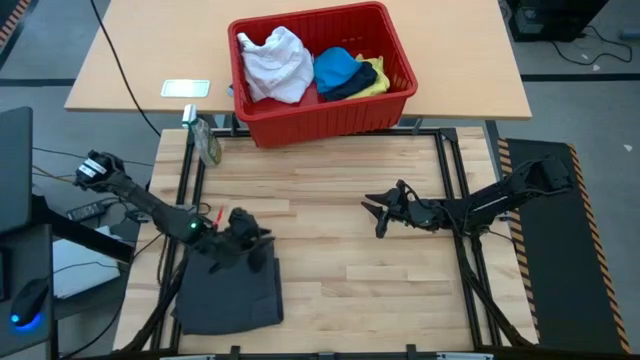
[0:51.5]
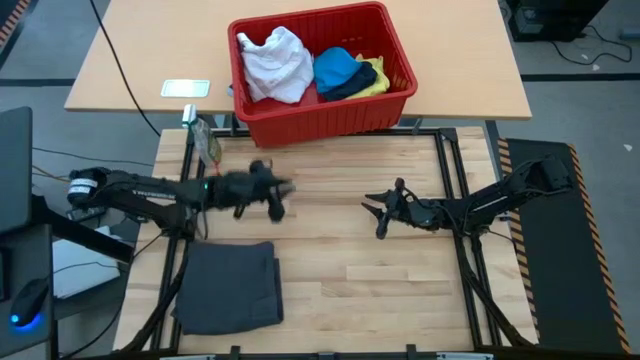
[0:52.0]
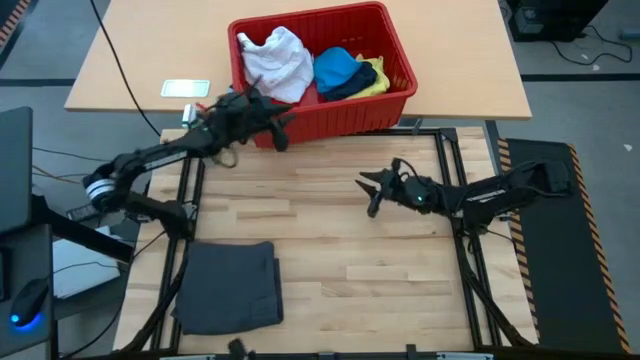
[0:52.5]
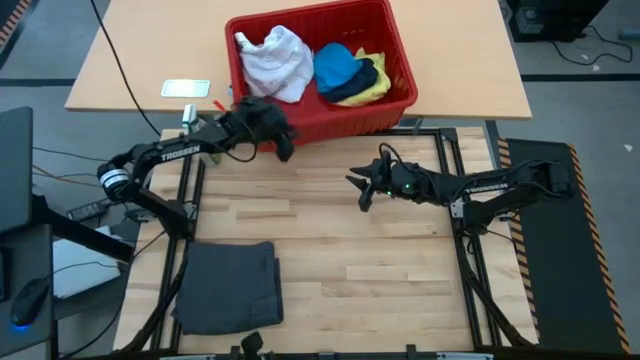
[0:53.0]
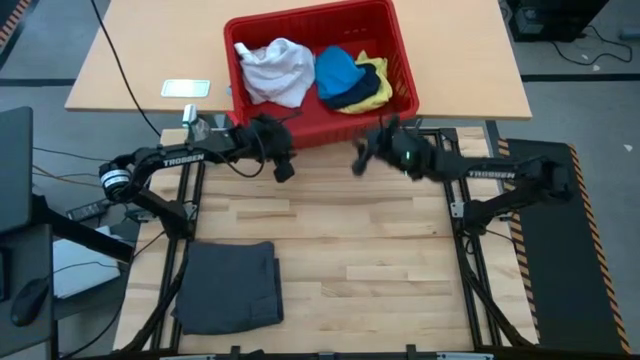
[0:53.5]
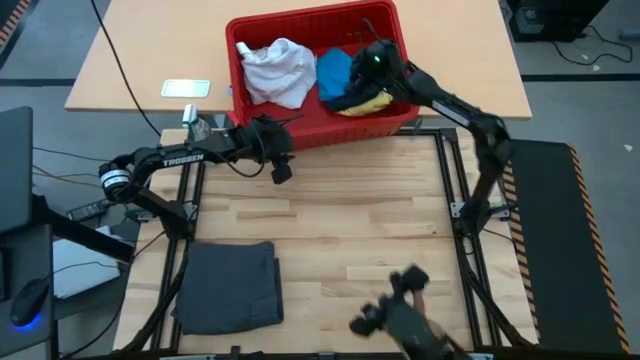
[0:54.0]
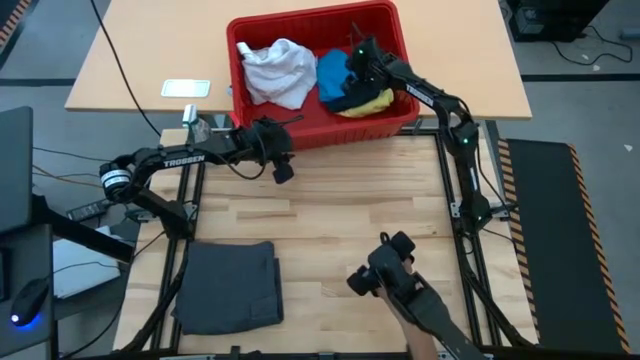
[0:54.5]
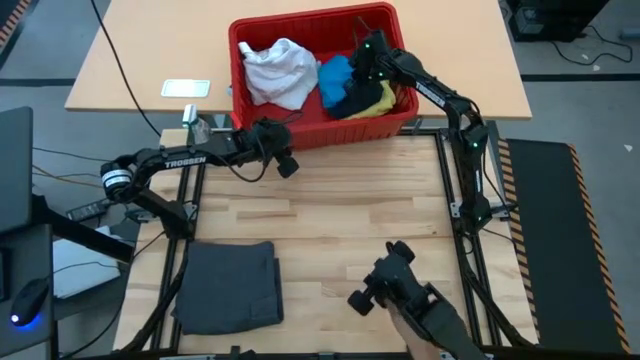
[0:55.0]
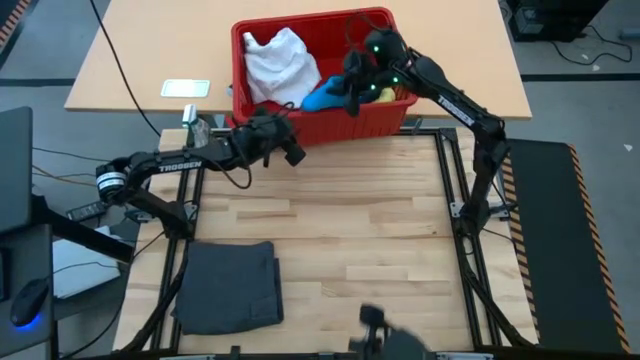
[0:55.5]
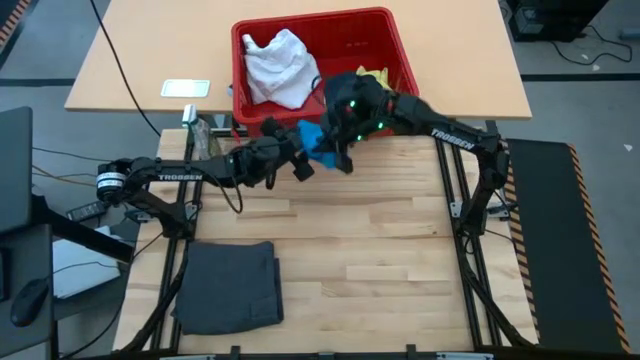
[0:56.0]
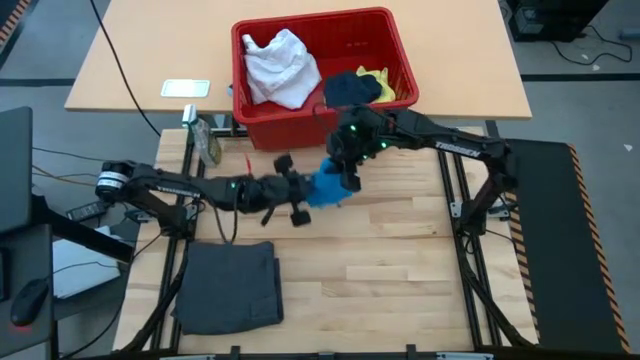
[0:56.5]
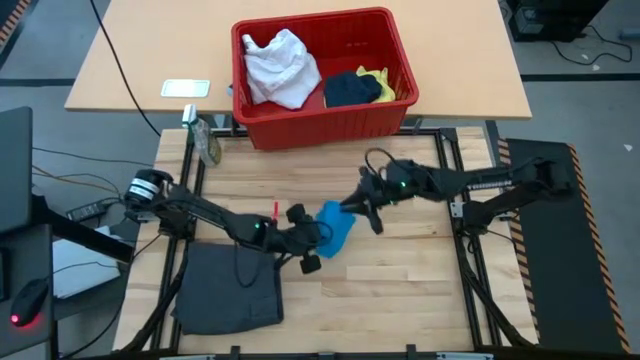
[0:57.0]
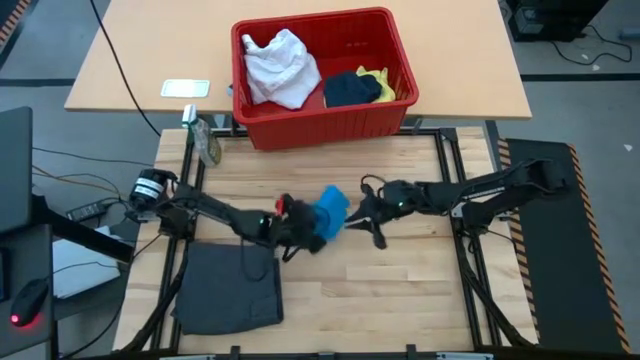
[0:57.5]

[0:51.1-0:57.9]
Task: Fold laundry
Remove the light blue shorts from the red bin

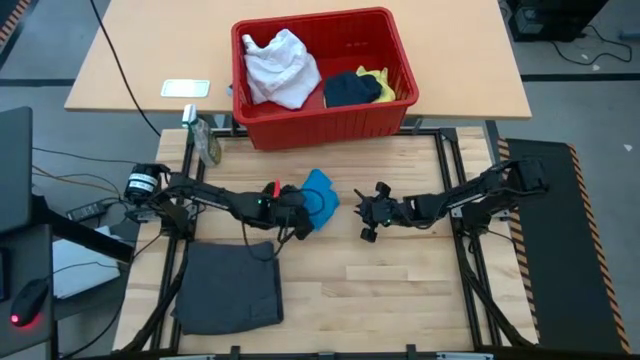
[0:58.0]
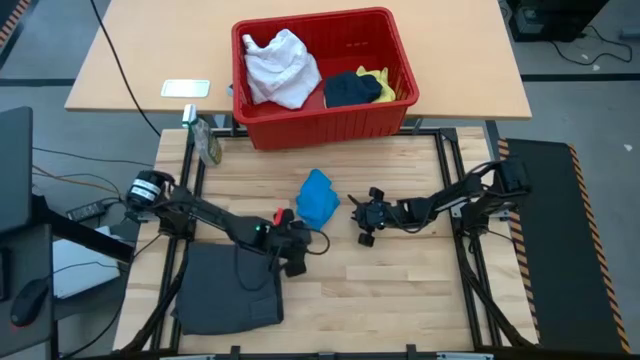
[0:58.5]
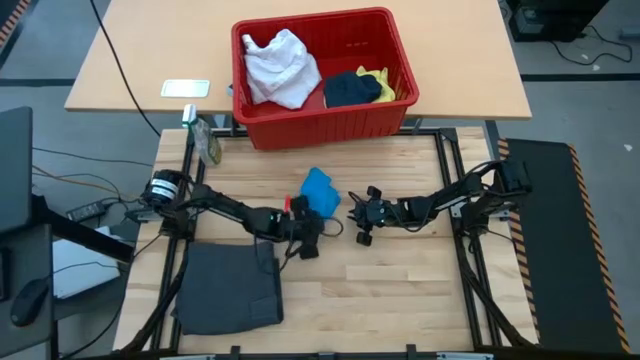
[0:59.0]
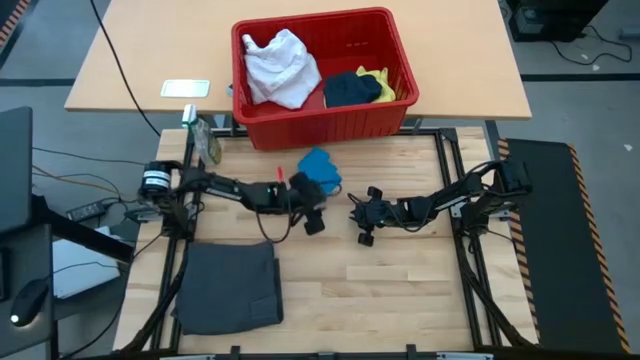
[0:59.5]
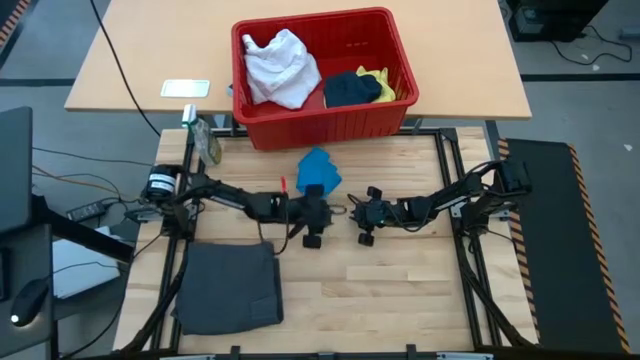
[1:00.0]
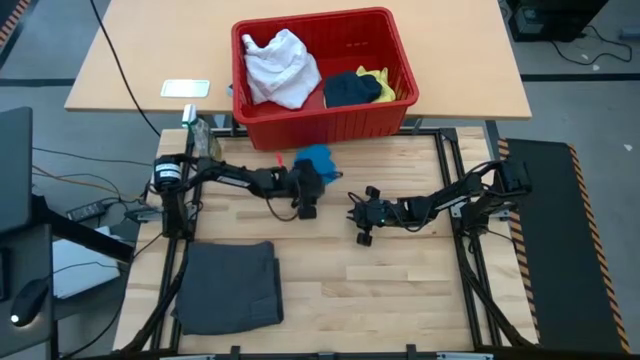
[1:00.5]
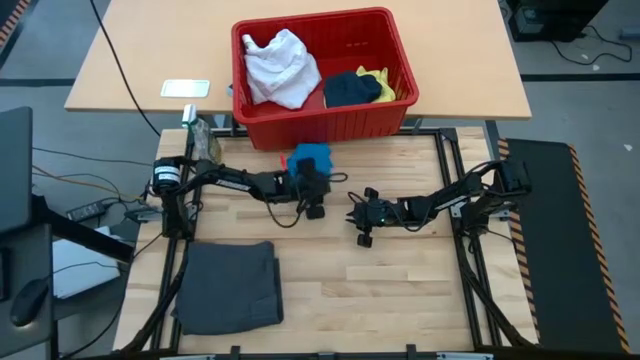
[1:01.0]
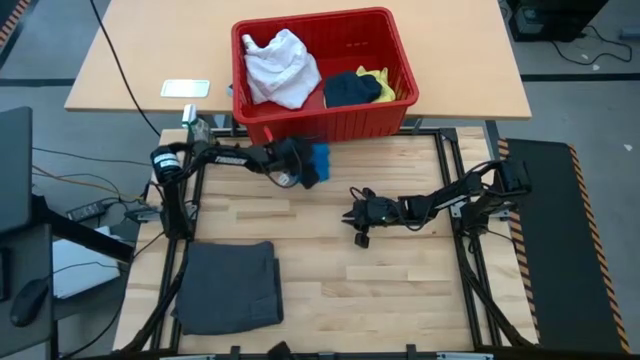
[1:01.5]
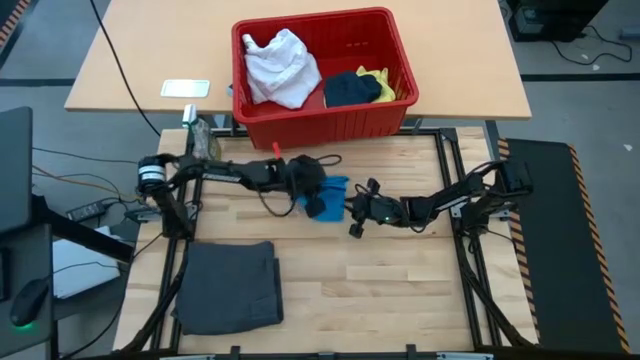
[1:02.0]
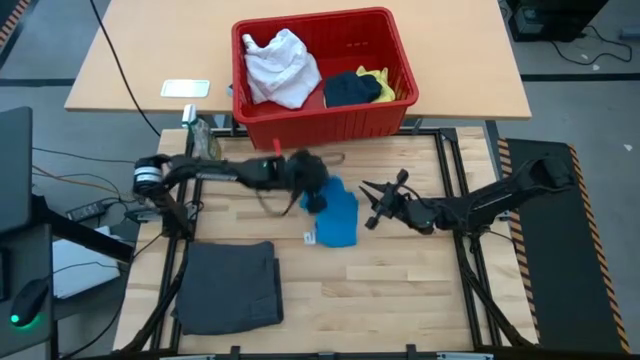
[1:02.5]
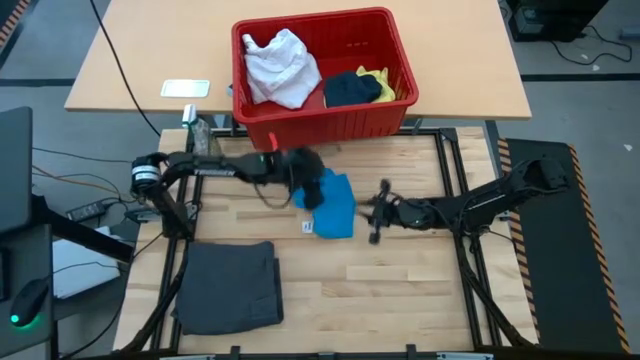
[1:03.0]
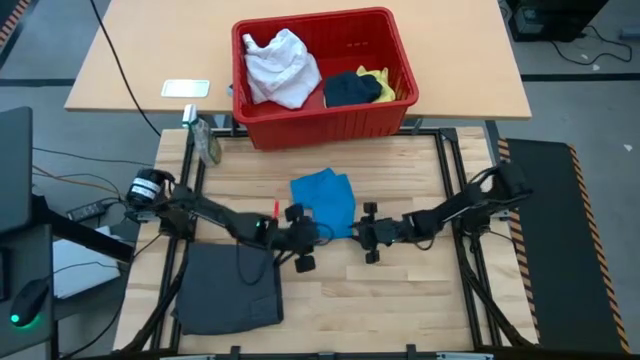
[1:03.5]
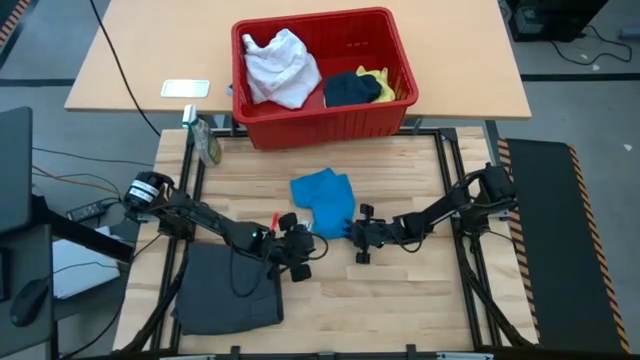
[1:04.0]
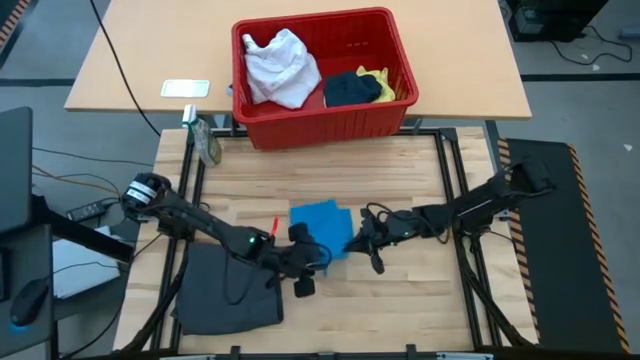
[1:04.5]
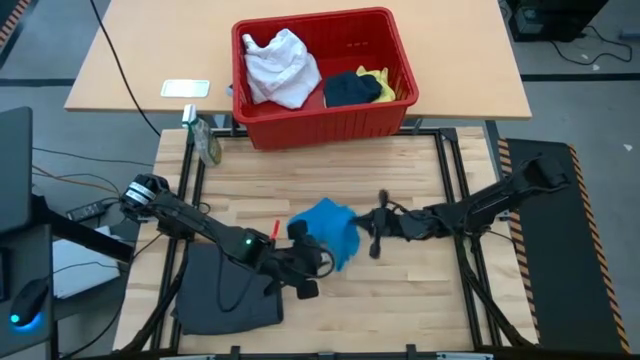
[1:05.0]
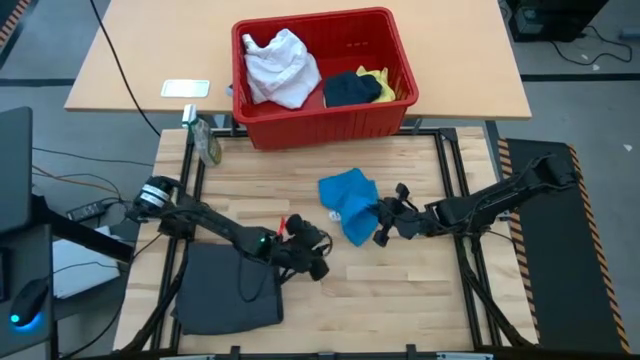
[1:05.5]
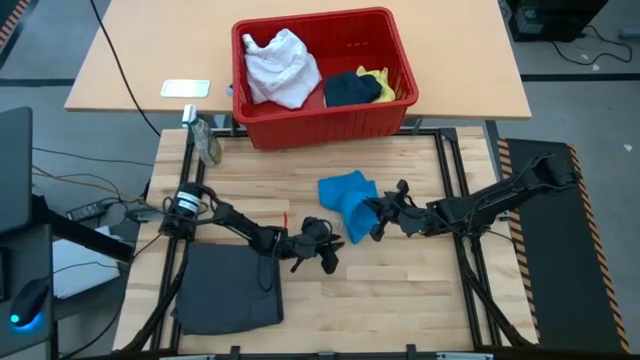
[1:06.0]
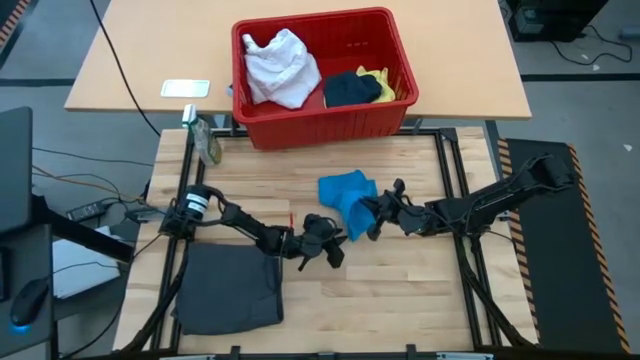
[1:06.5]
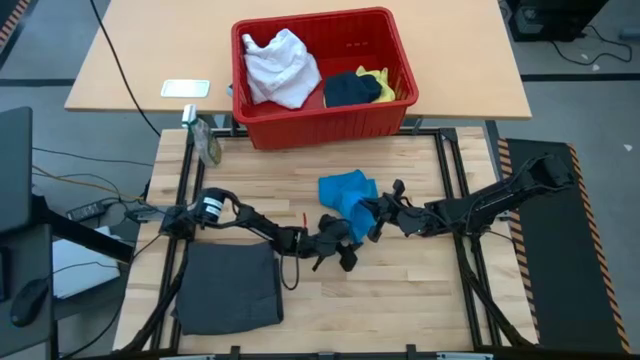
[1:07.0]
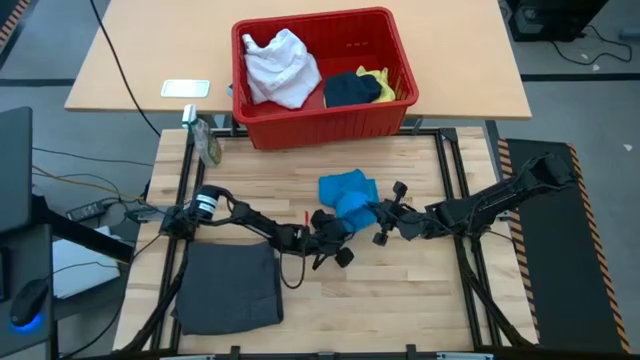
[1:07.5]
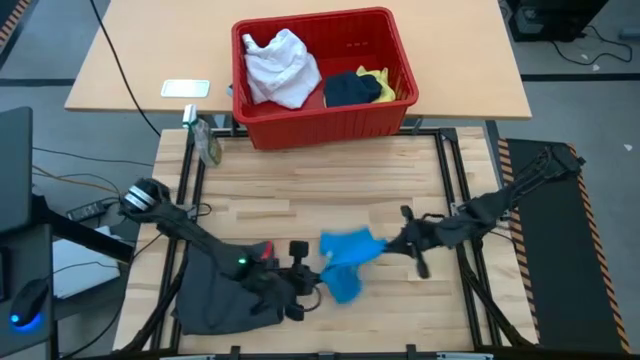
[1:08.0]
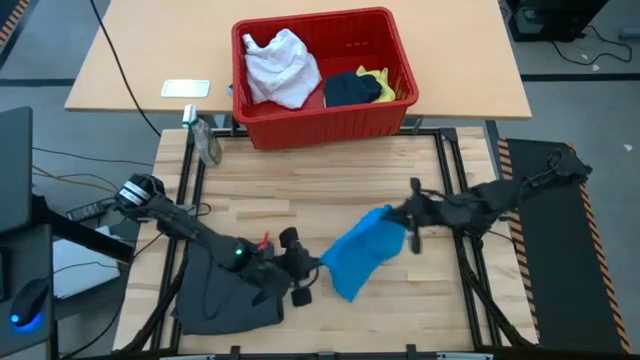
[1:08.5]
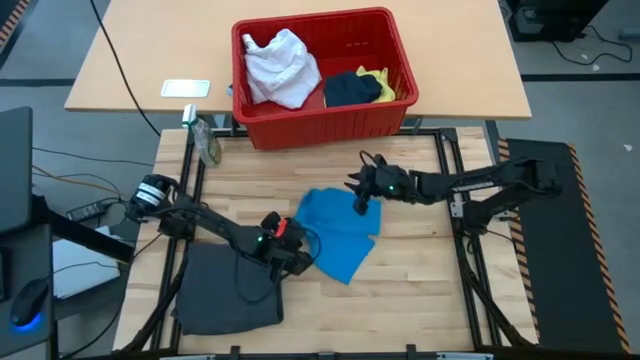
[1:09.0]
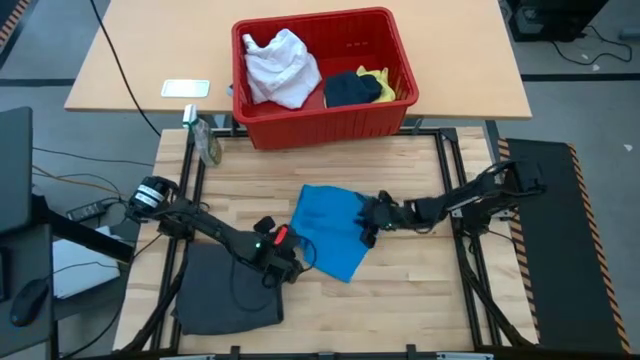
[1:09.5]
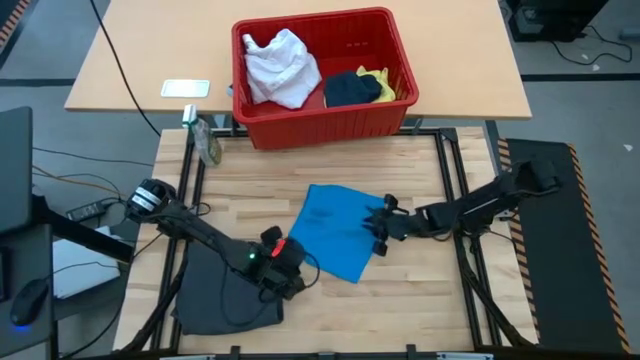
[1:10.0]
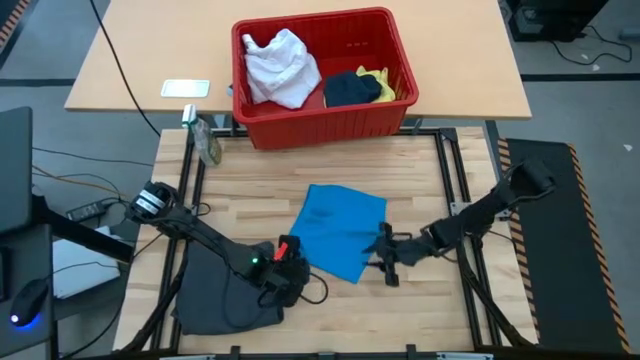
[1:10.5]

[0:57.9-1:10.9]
Fold the light blue shorts

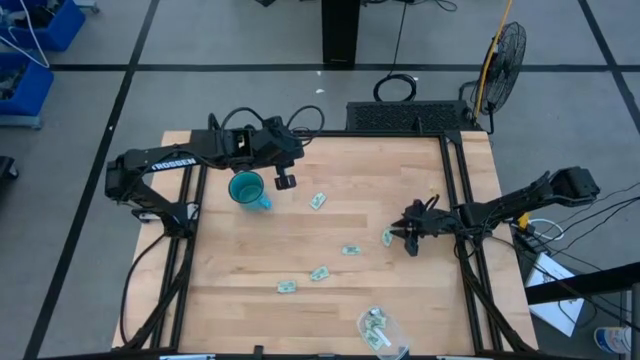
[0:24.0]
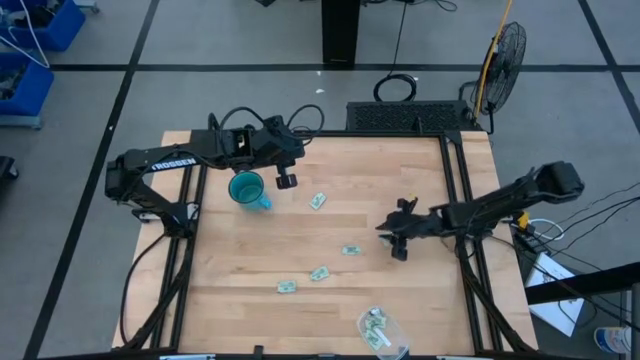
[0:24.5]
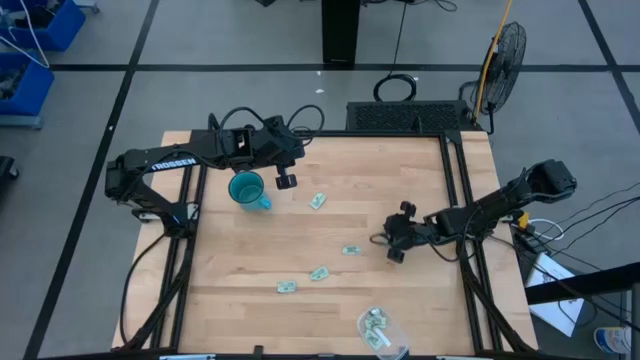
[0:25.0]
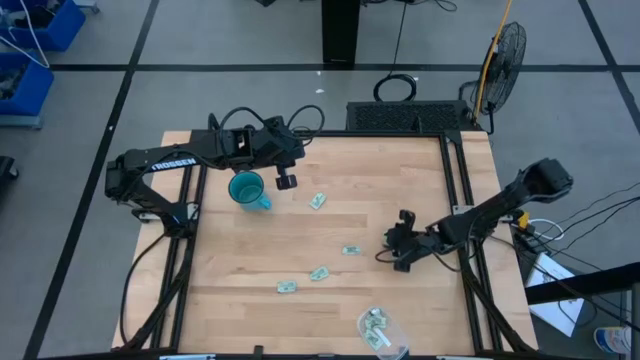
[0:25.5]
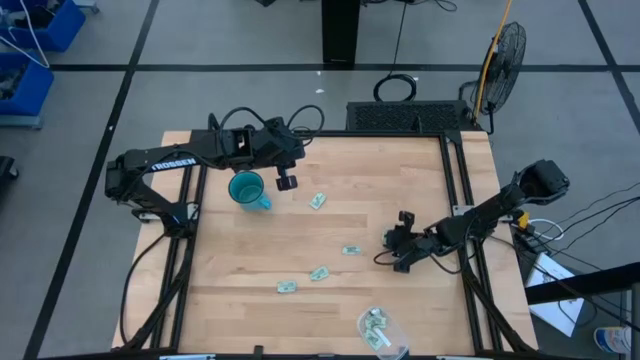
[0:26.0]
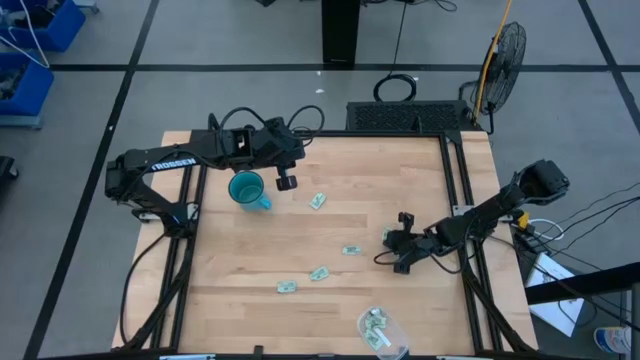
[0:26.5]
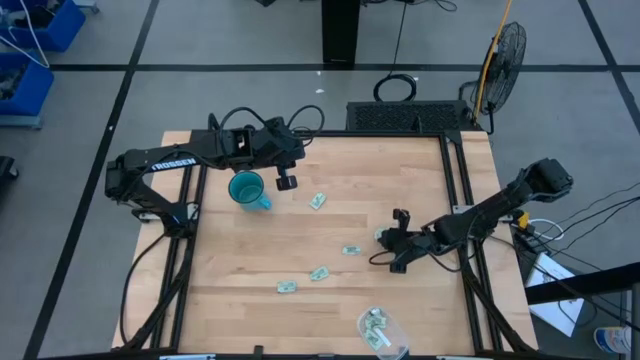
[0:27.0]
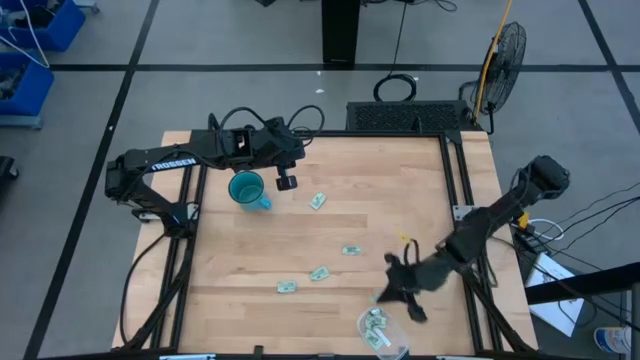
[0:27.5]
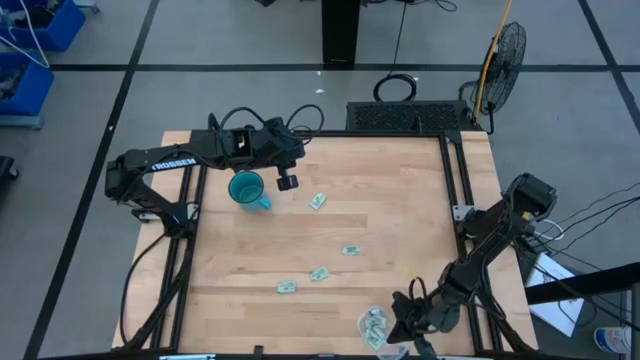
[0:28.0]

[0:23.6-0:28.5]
Task: Pick and place Stevia / Truvia into bins
Put the green stevia packet into the transparent container
